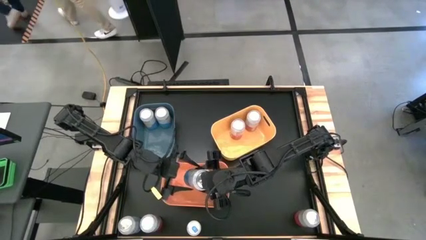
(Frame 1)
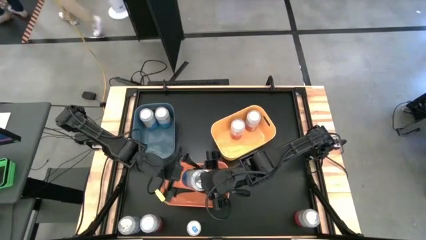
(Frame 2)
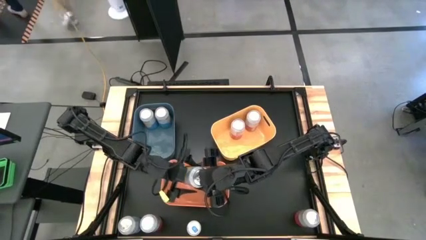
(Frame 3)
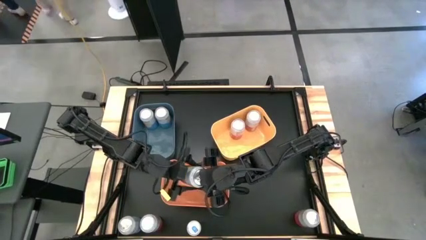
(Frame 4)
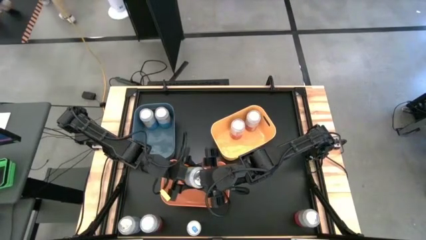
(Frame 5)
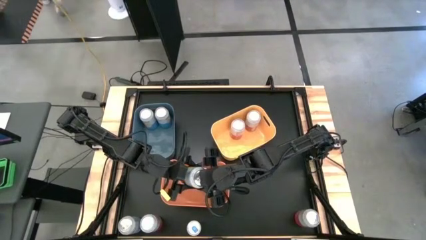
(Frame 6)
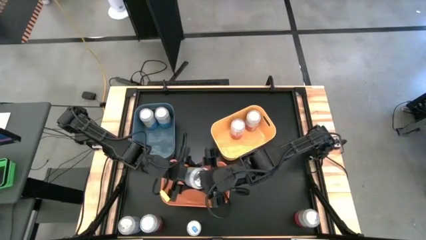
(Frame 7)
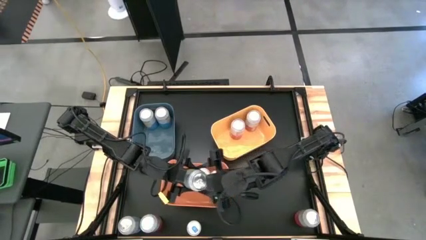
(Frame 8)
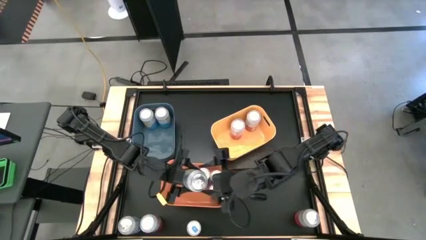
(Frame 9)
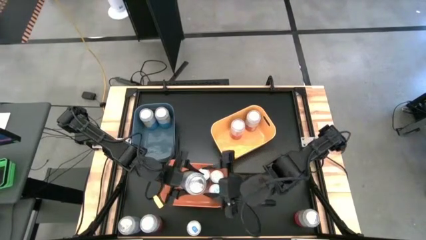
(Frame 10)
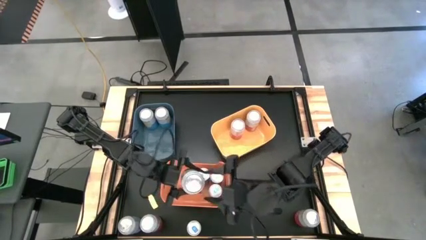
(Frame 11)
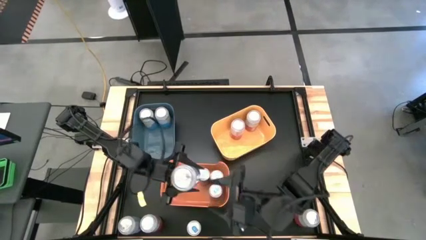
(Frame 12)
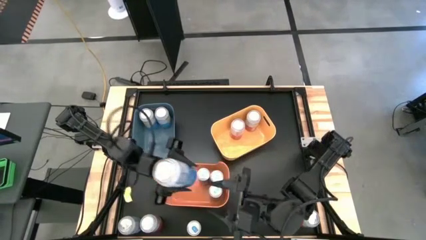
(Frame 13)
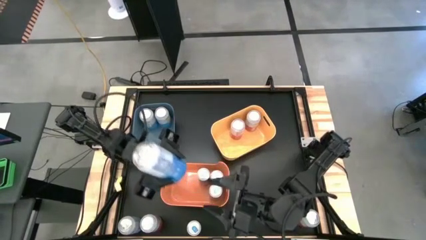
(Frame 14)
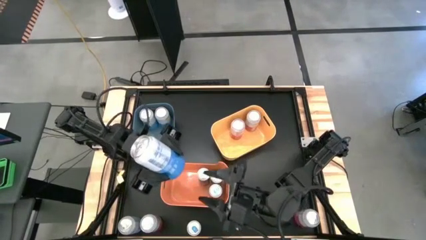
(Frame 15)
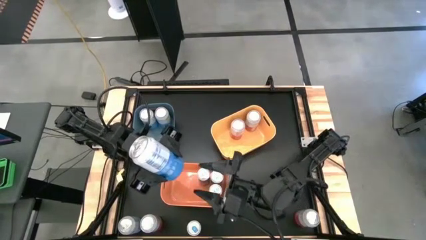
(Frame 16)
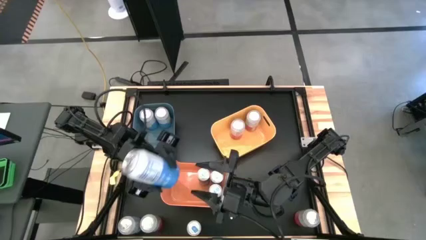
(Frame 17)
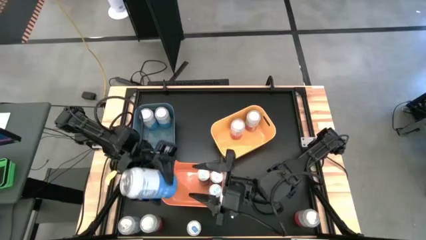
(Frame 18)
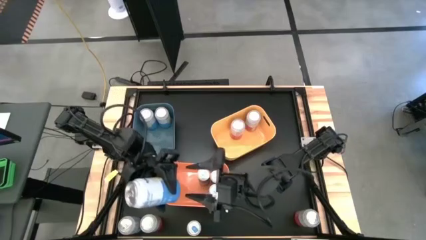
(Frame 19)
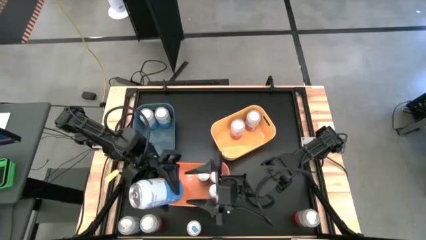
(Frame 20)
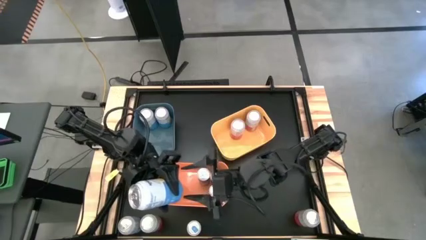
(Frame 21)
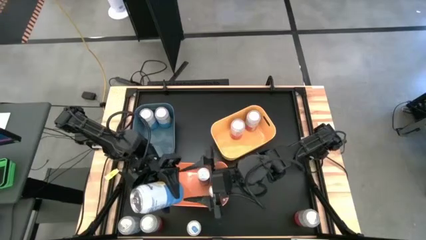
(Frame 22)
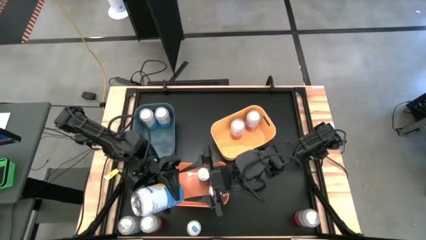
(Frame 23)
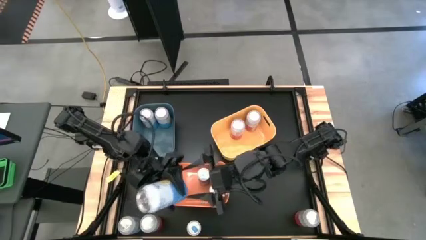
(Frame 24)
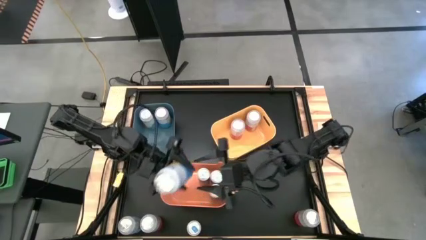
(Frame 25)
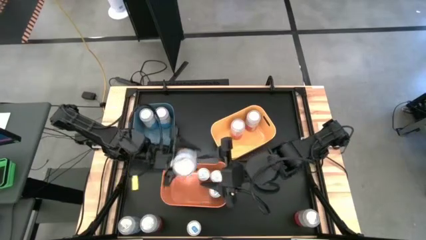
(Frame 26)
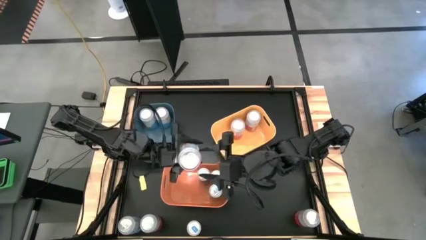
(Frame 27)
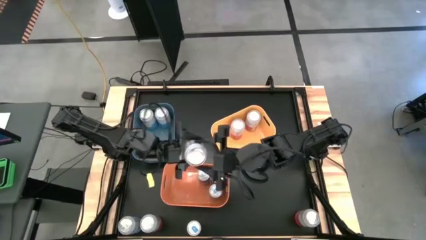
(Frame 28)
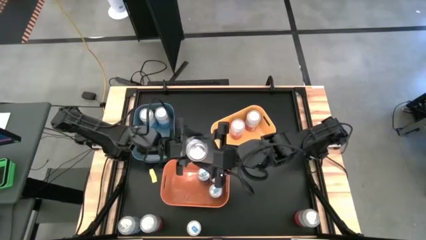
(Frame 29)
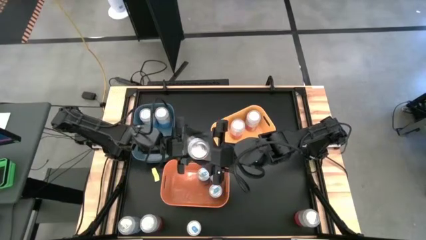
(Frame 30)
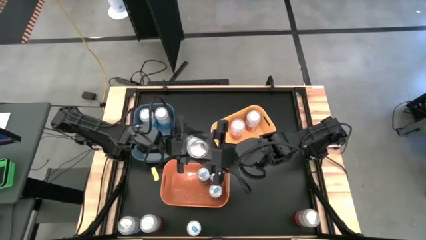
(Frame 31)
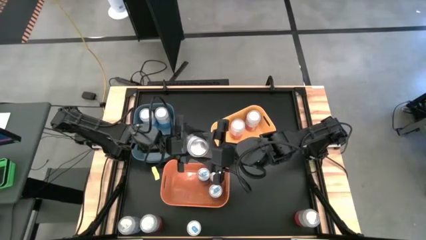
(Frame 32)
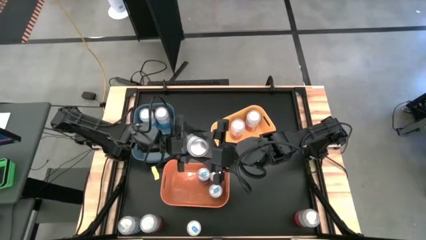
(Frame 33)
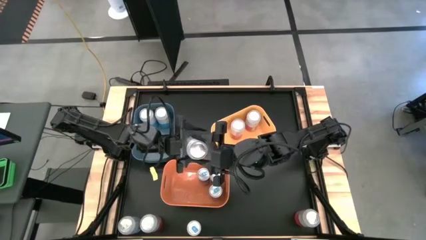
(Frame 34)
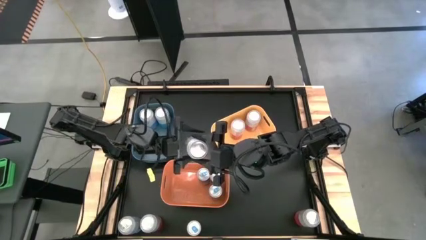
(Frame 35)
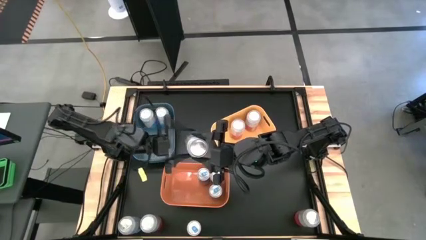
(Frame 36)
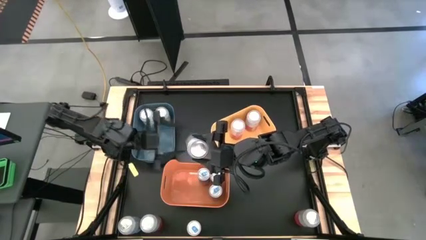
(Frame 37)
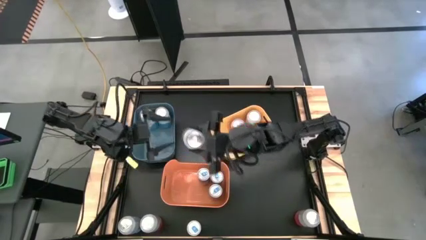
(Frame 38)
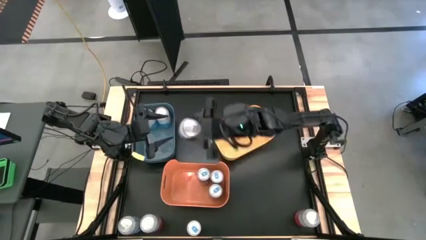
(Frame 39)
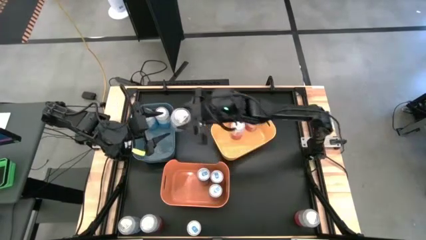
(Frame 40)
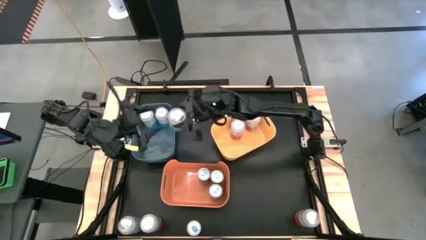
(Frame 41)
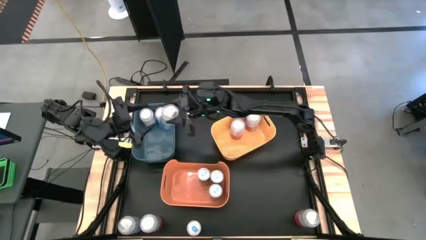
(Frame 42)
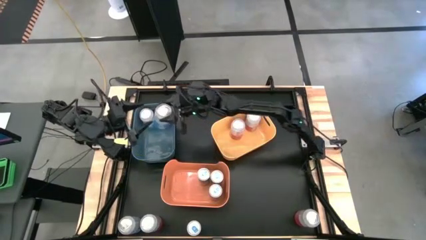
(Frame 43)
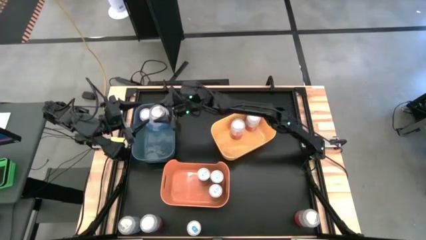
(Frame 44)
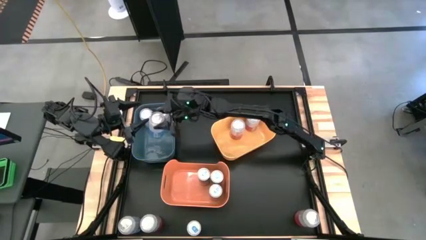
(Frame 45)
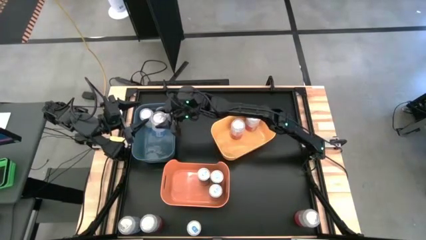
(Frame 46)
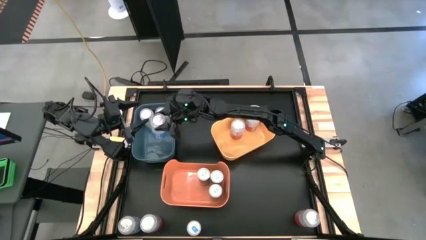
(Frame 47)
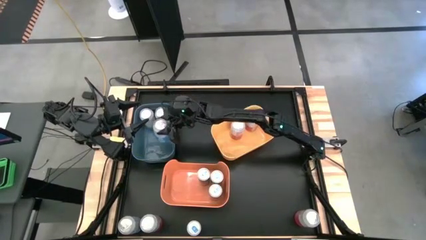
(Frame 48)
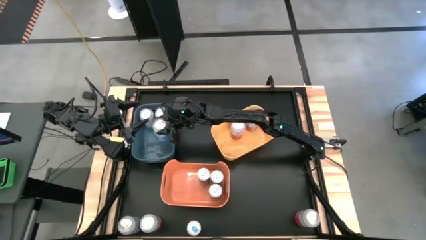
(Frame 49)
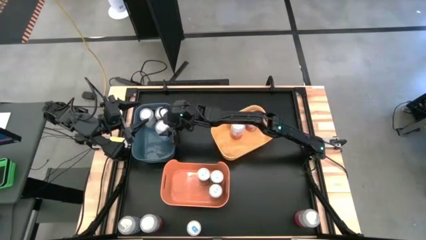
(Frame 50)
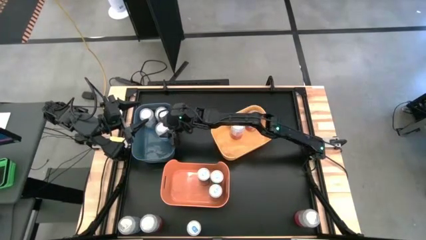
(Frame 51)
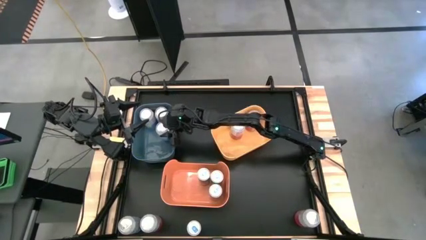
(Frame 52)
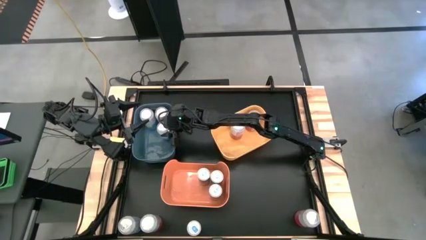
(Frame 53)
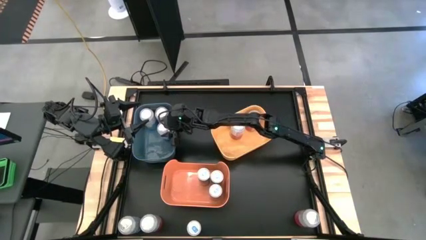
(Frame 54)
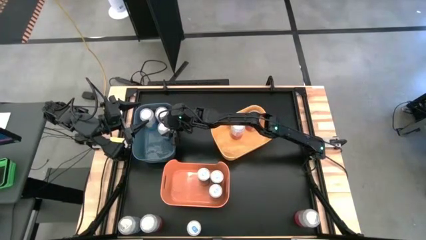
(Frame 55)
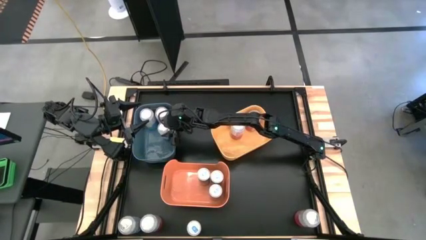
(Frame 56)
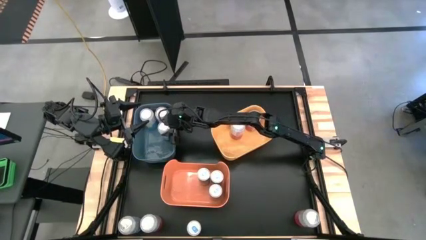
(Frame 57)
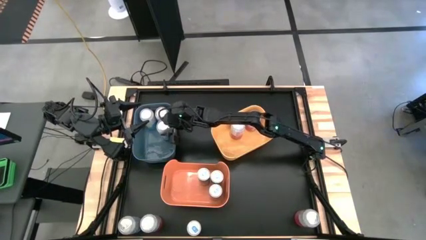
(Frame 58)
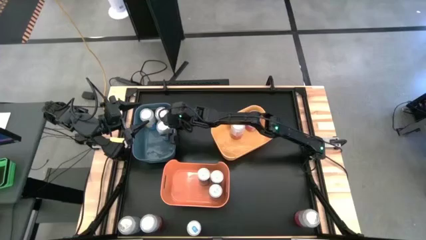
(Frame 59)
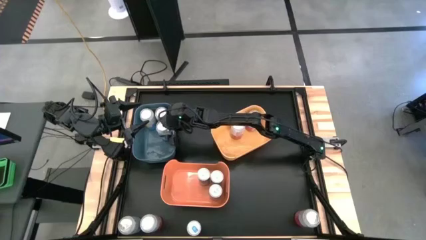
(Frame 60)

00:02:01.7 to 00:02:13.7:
Task: Sort soda cans
Put the blue soda can into the blue bin

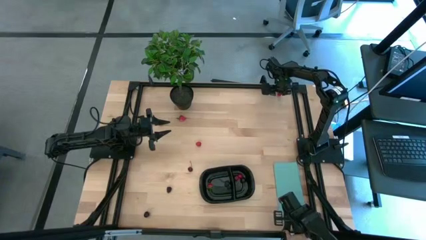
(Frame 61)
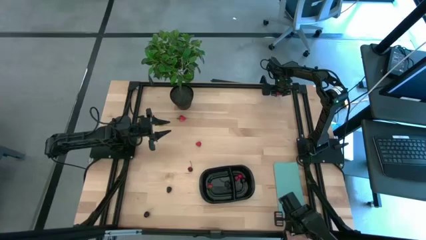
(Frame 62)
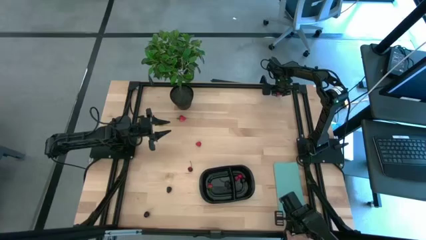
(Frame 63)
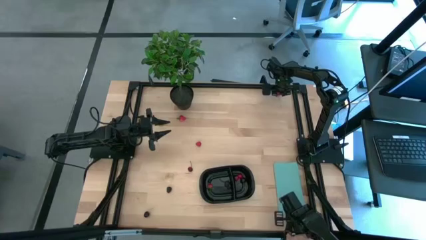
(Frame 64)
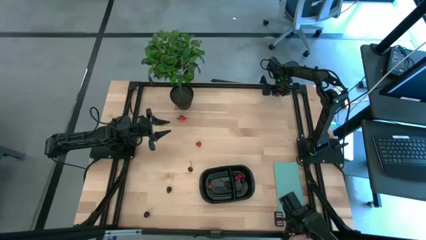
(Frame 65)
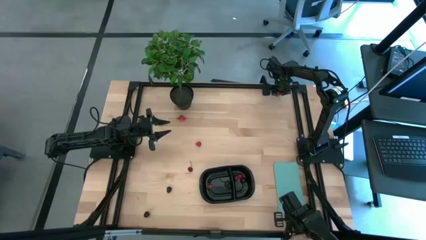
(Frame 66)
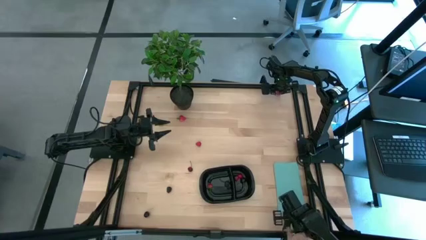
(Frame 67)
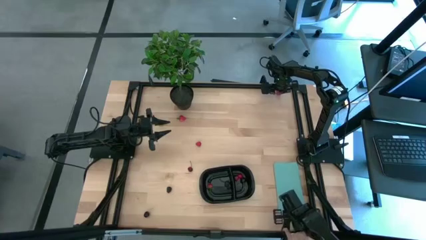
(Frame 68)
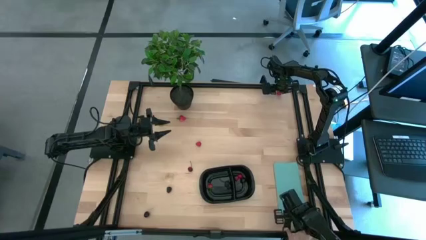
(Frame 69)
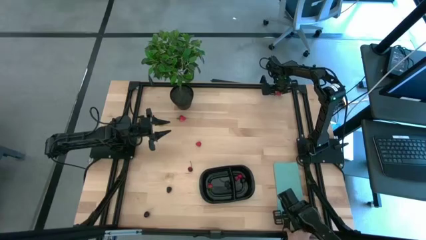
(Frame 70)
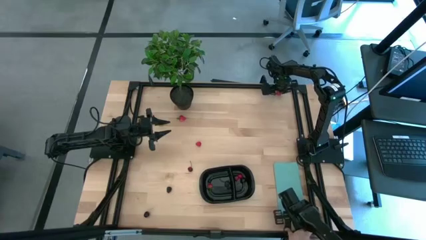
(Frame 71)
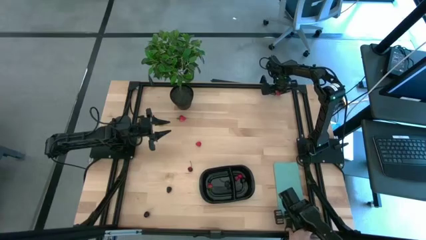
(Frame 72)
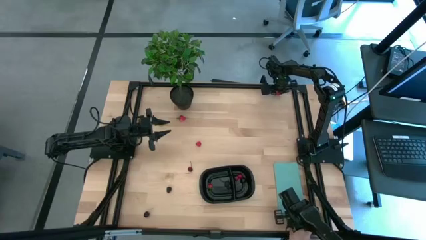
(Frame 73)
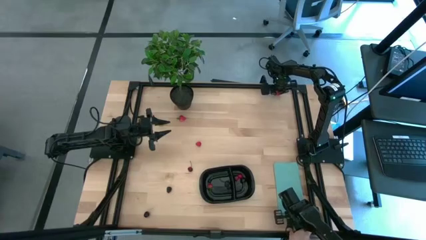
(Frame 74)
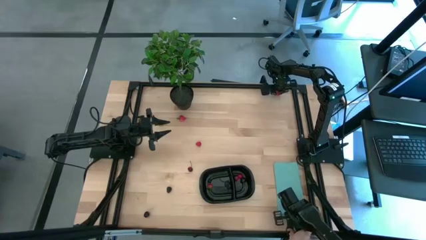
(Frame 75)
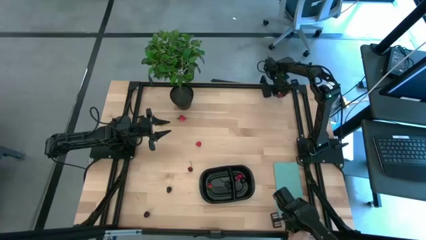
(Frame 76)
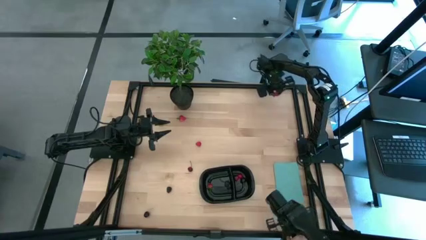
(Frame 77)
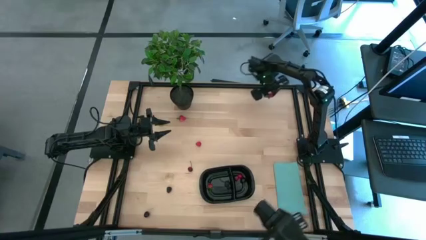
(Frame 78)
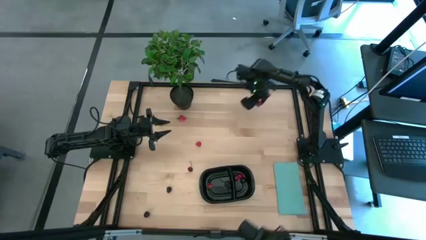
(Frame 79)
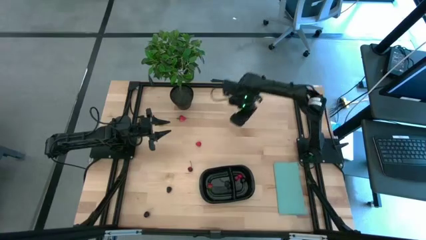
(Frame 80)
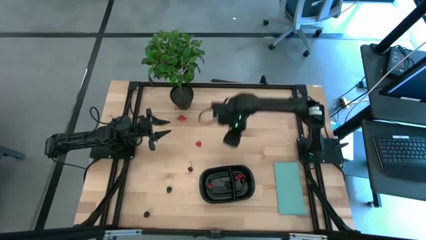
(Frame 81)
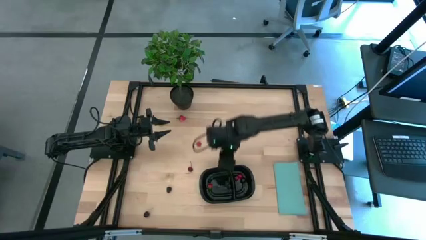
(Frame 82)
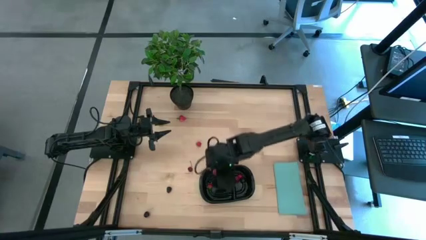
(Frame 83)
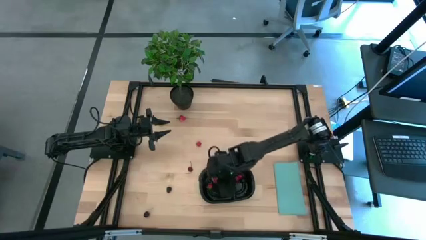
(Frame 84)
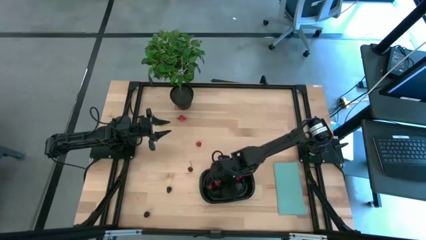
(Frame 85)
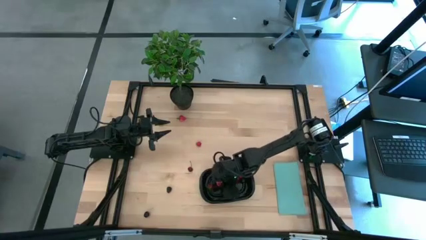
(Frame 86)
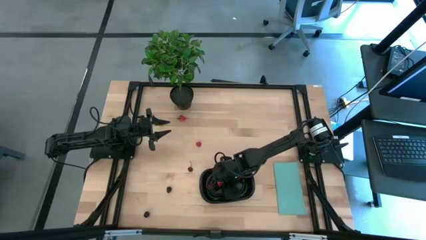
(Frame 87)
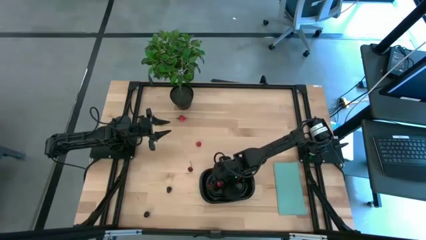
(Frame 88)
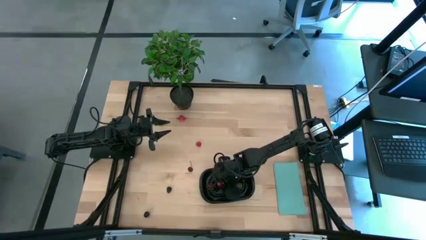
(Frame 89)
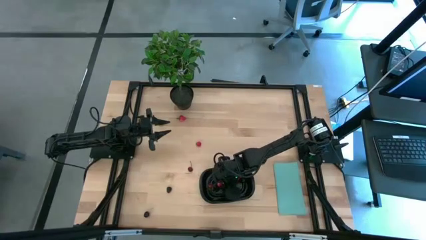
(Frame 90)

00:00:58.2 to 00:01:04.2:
Task: Pick and placing Produce into tupperware
Put the top raspberry into the left side of the black container
